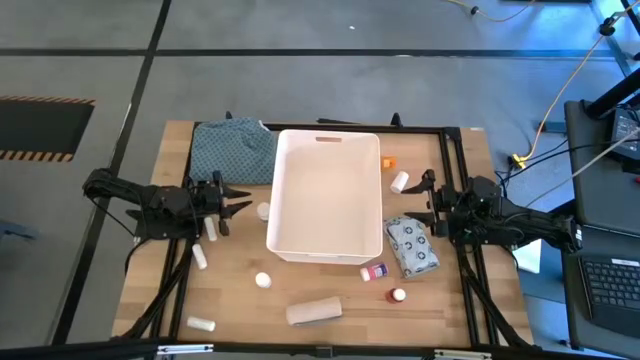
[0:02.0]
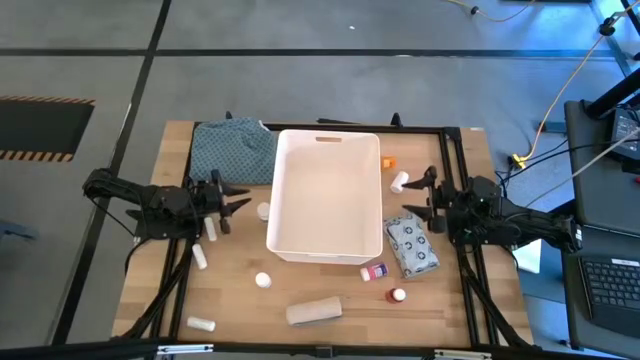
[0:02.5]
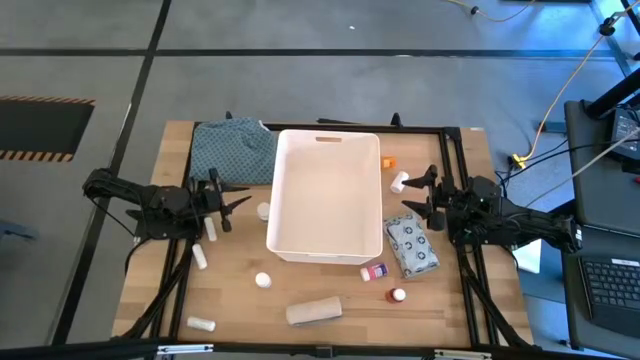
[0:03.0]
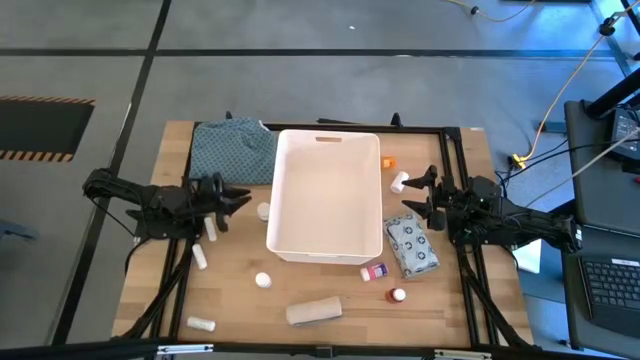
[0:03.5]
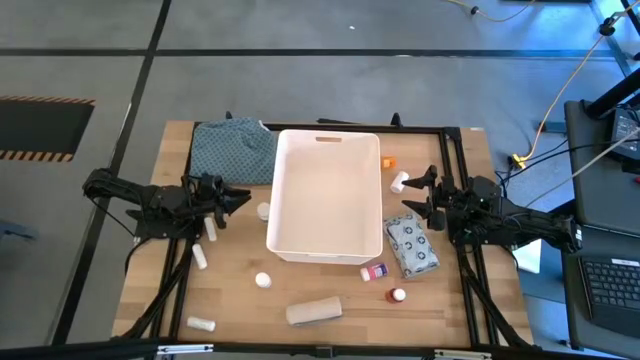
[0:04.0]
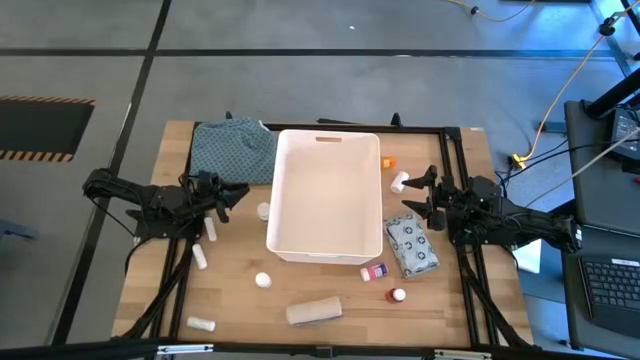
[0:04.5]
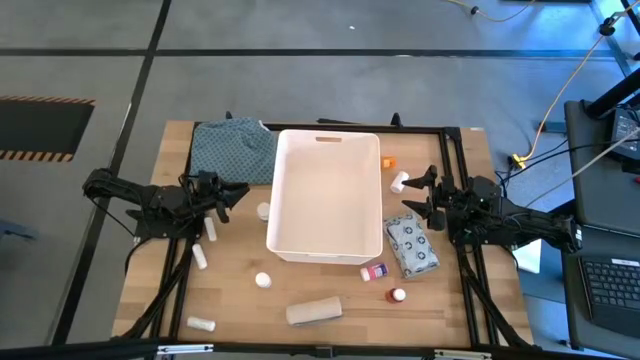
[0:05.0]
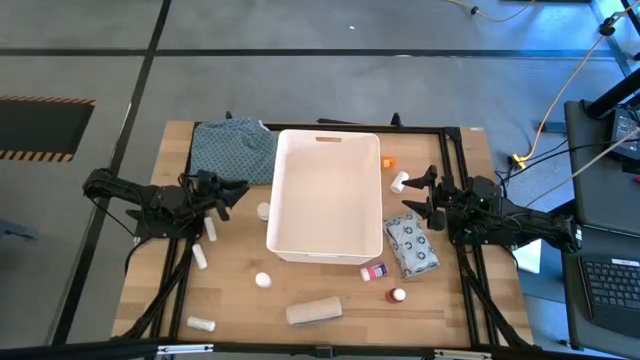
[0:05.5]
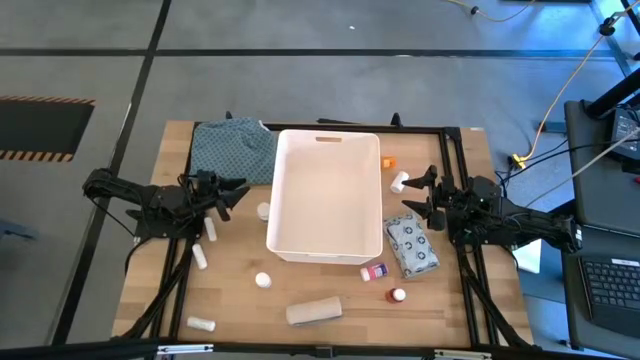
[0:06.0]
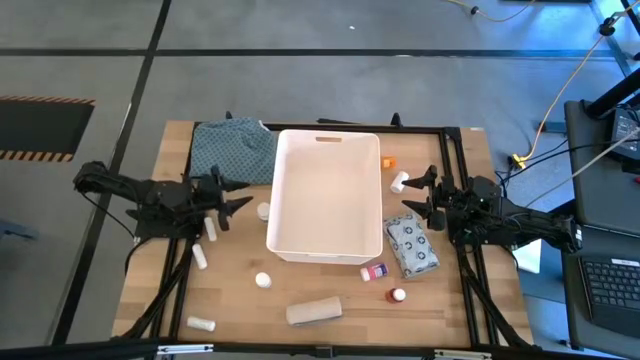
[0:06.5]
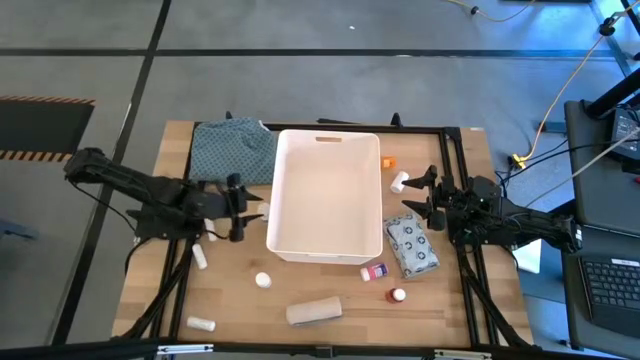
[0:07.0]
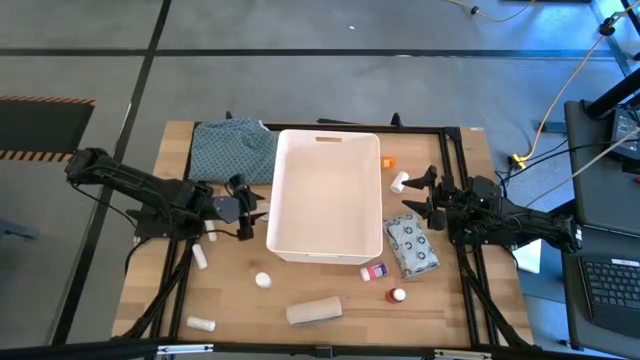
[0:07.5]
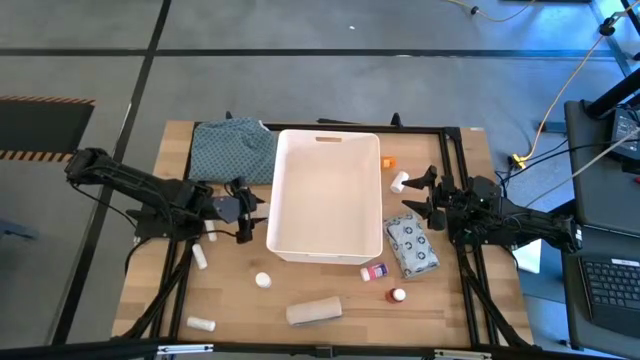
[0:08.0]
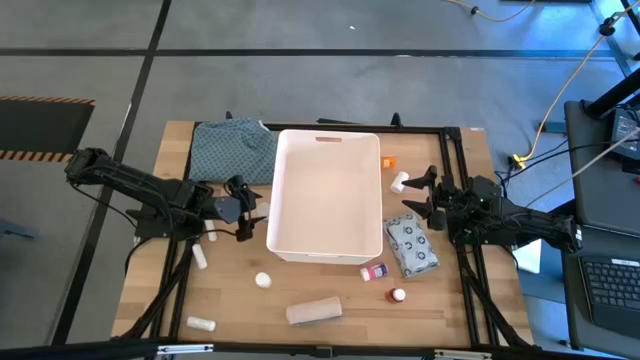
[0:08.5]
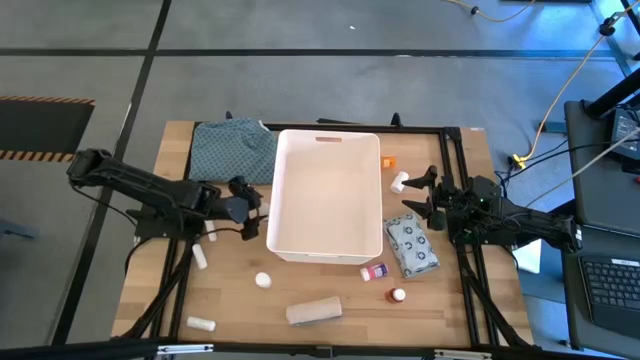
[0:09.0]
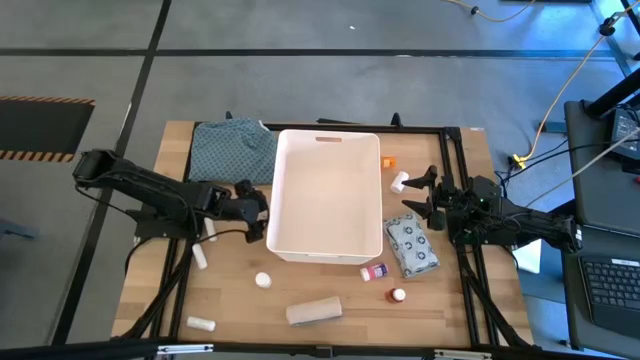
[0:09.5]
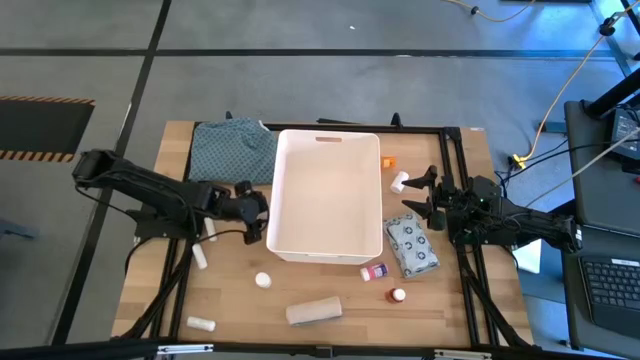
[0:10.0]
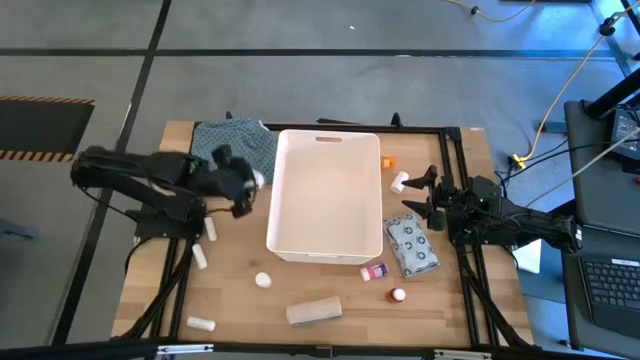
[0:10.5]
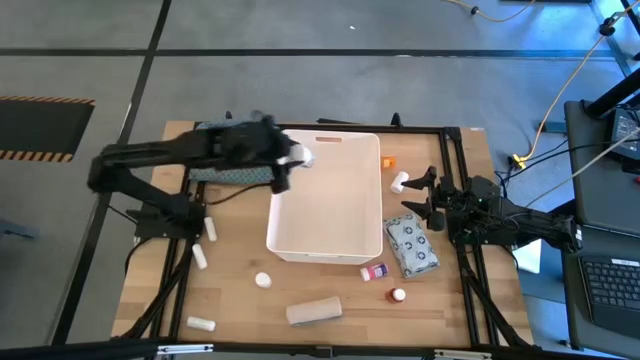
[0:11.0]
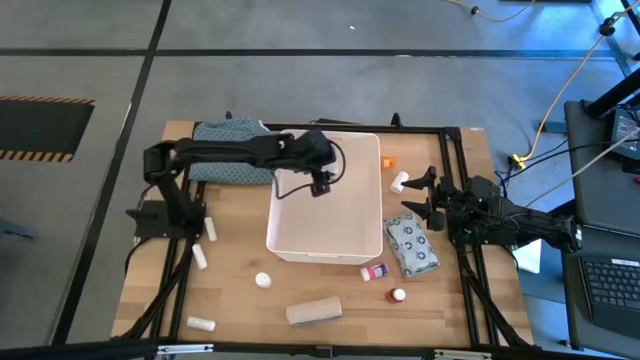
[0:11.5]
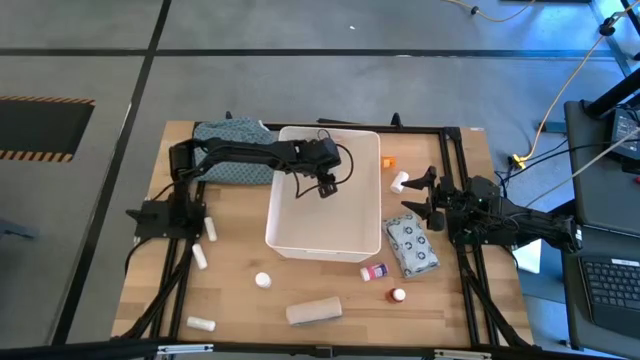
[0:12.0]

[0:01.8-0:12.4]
Task: Pick & place medical supplies in basket/bin
Put the top left white medicine bottle into the white bin

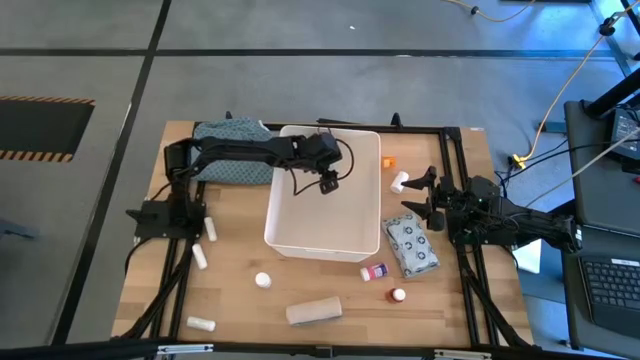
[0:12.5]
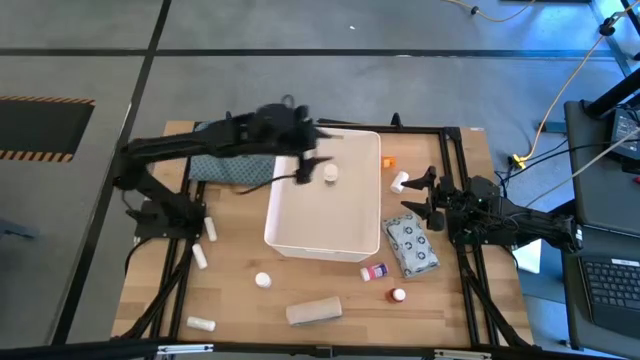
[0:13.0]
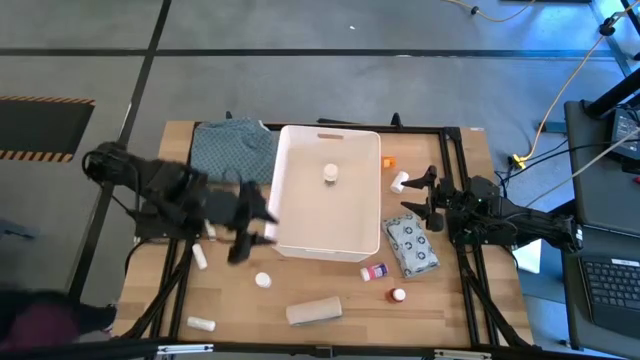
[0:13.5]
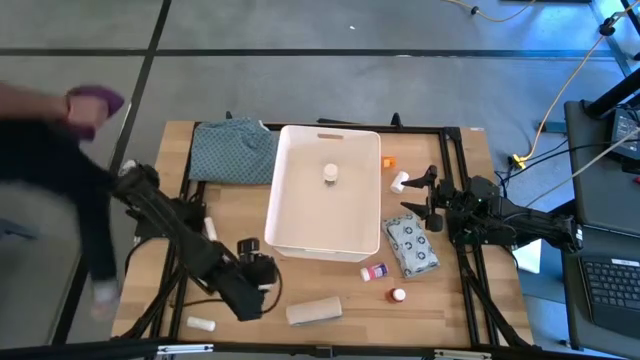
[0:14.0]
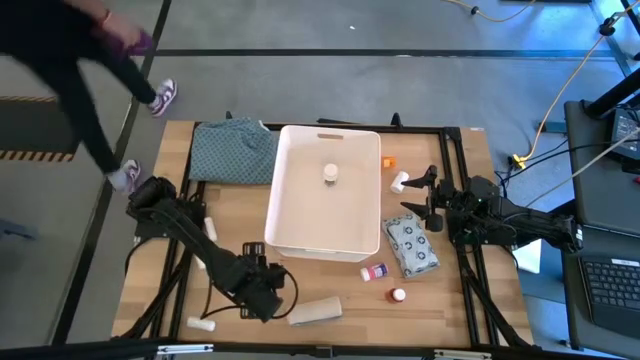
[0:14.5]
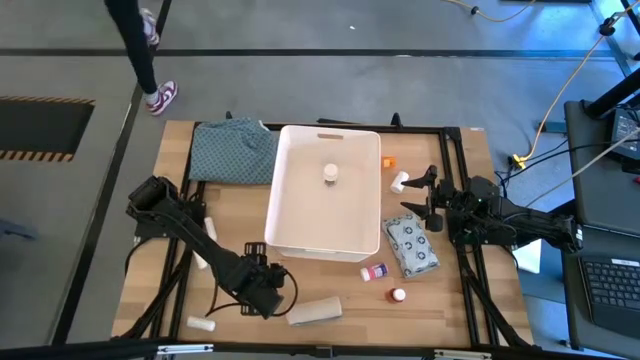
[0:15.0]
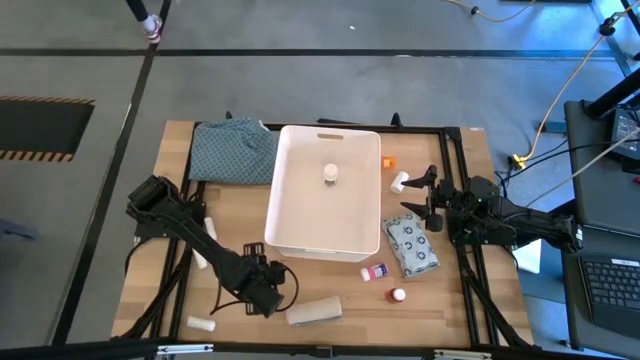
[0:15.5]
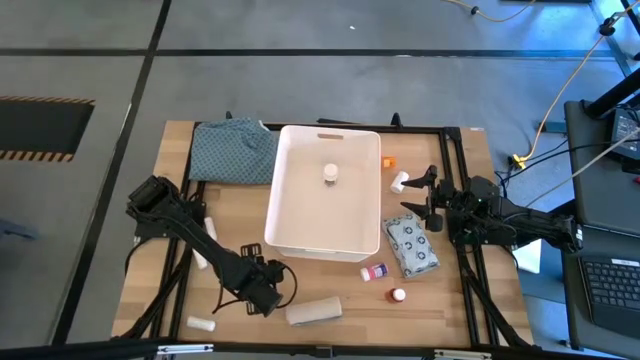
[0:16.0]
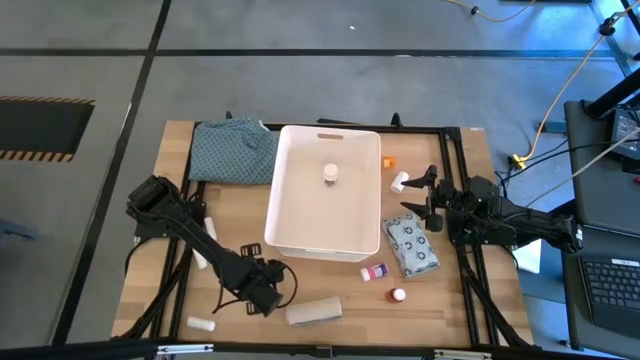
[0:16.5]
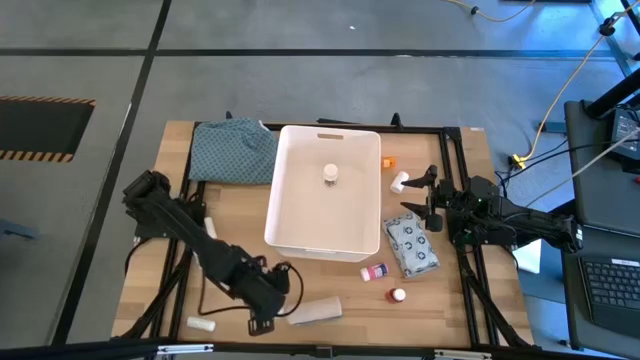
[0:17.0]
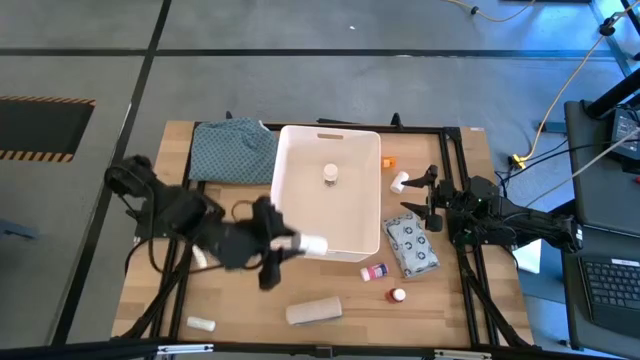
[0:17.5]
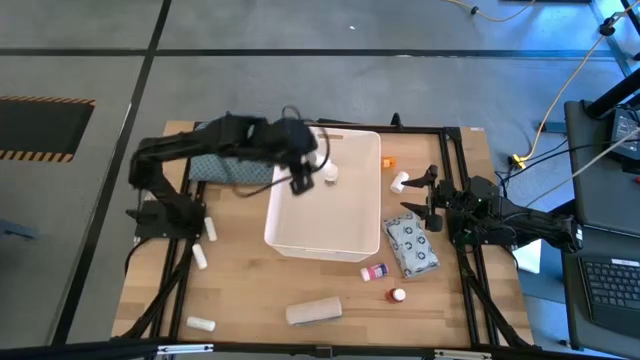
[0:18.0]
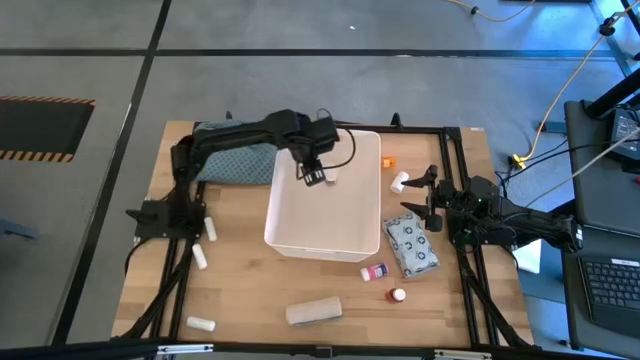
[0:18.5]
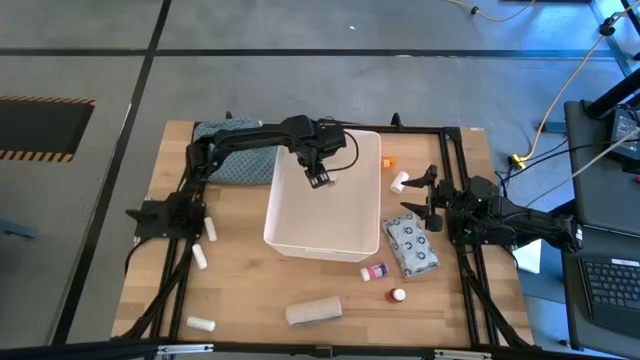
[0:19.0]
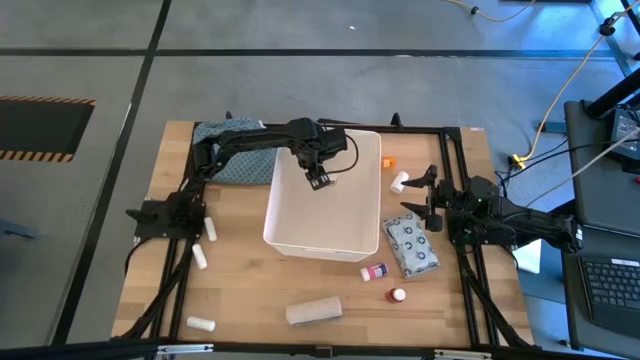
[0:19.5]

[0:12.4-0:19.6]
Put the bottom white medicine bottle into the white bin

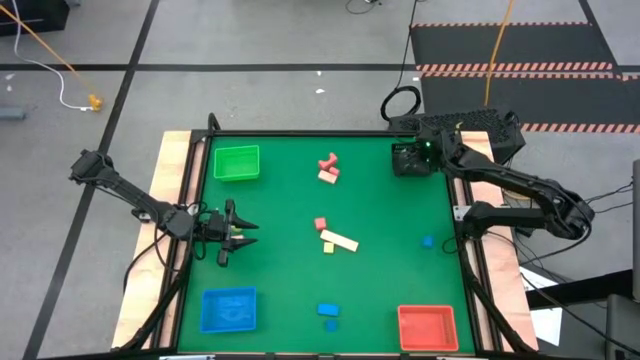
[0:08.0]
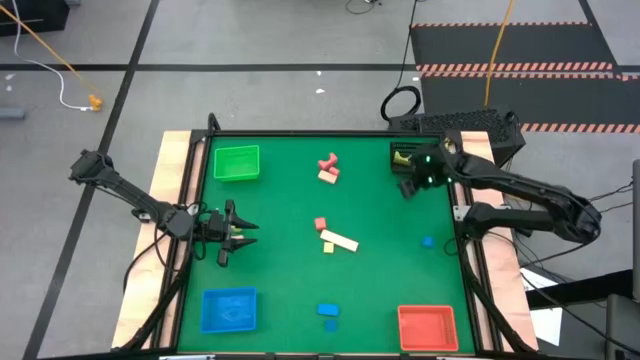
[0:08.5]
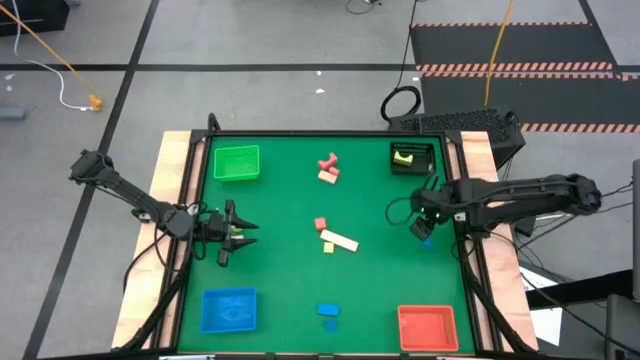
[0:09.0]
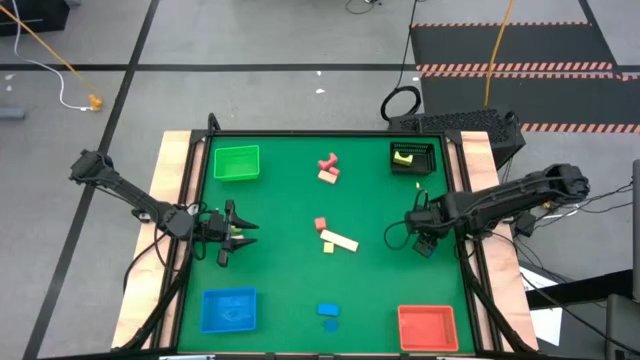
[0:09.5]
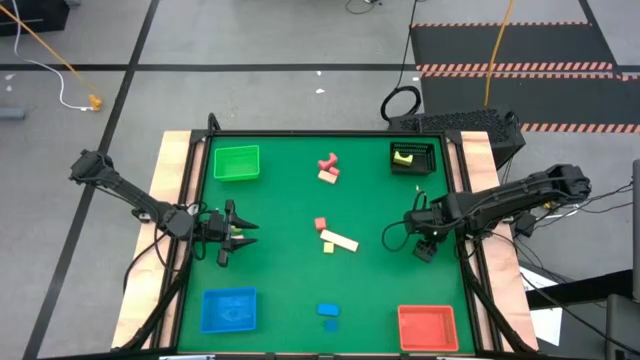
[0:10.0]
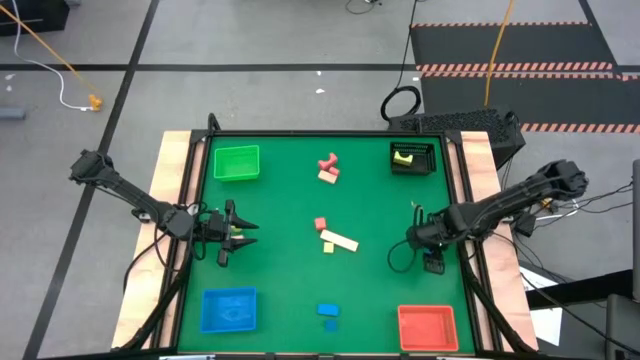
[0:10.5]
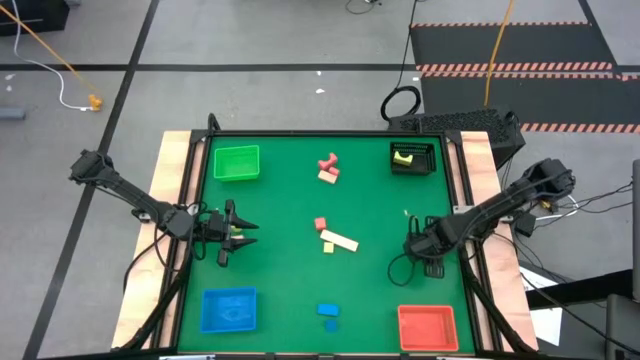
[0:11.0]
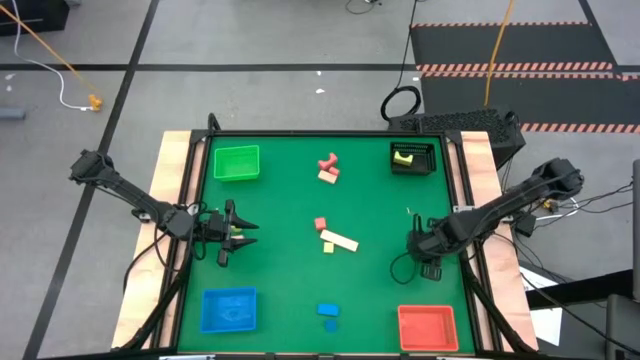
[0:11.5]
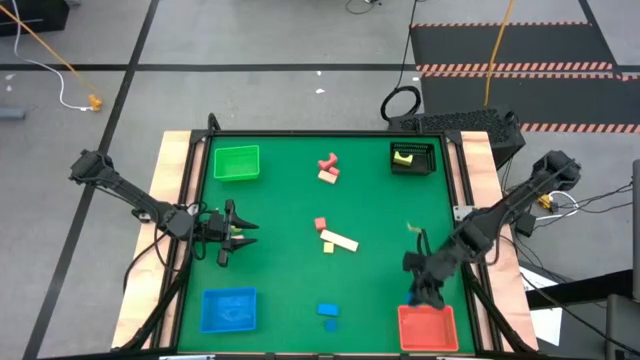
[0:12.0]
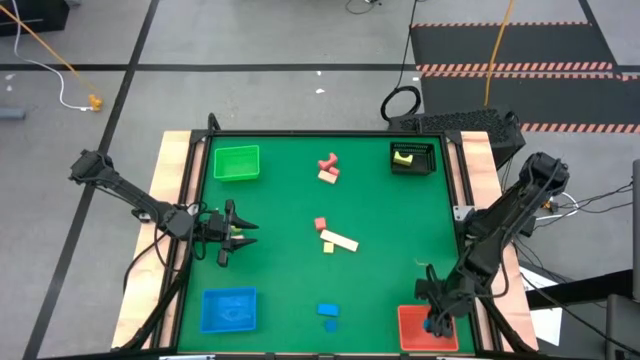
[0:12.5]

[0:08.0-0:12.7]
Task: Sort & place blocks by color
Put the top blue block into the orange bin
